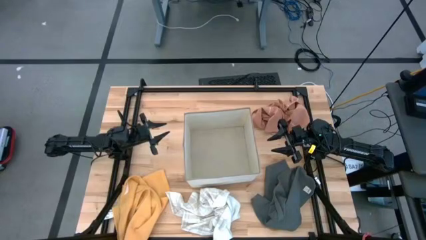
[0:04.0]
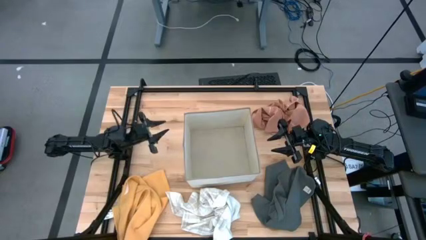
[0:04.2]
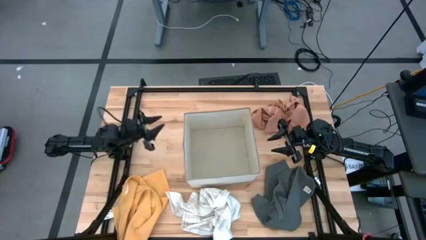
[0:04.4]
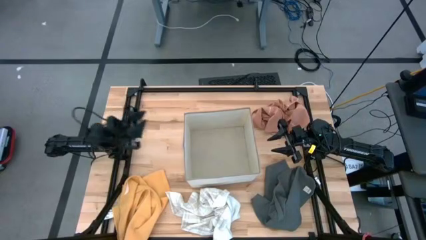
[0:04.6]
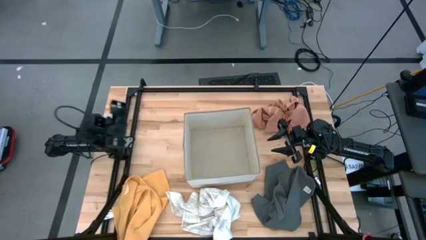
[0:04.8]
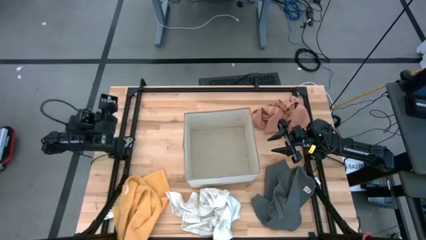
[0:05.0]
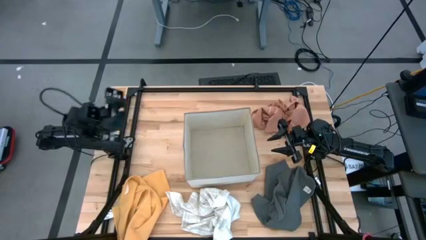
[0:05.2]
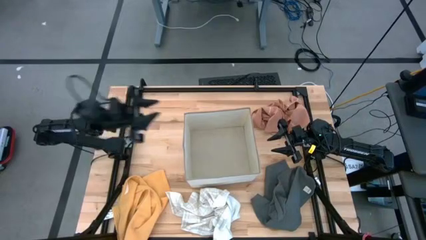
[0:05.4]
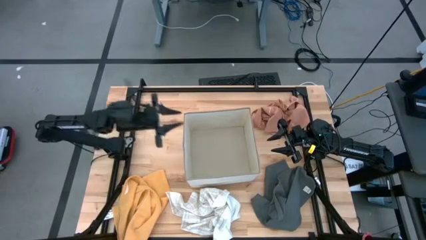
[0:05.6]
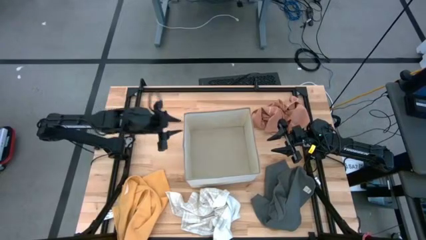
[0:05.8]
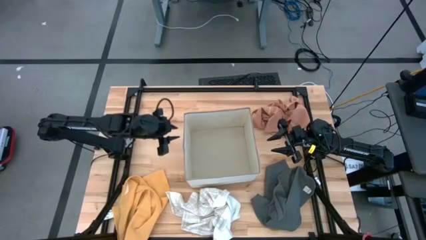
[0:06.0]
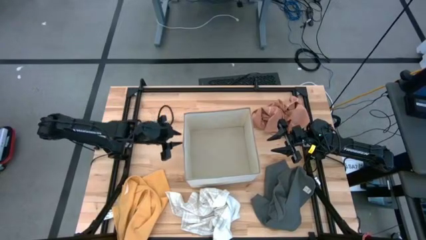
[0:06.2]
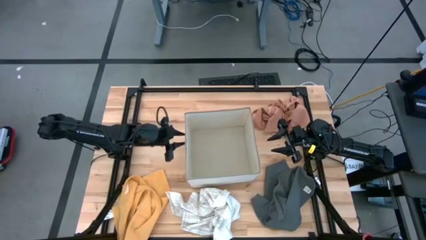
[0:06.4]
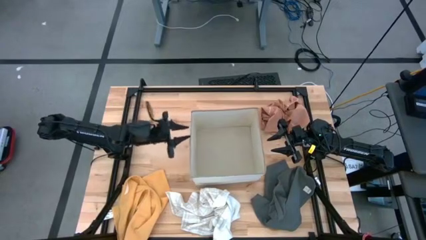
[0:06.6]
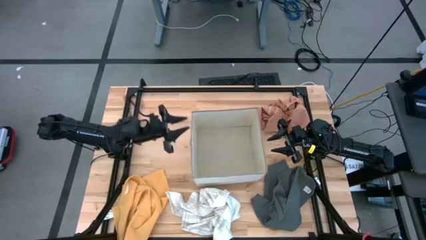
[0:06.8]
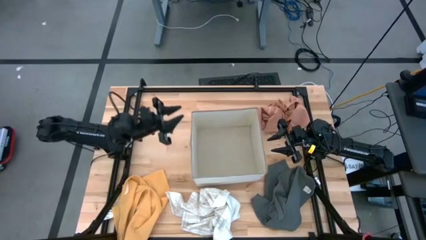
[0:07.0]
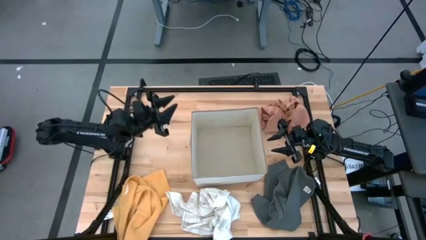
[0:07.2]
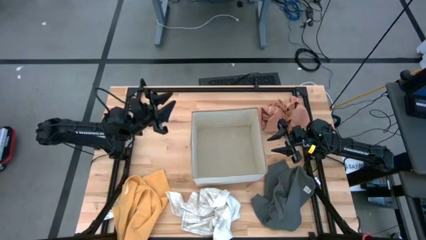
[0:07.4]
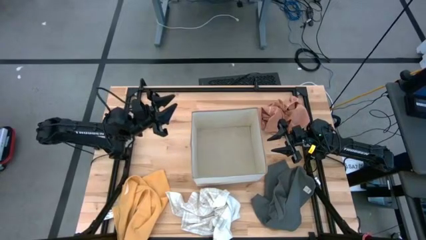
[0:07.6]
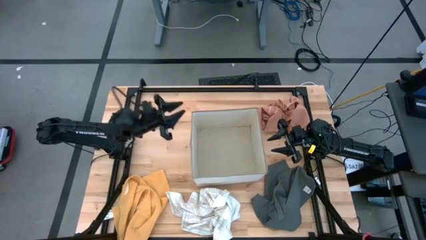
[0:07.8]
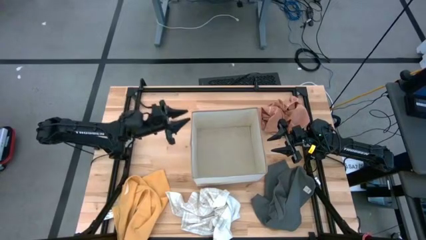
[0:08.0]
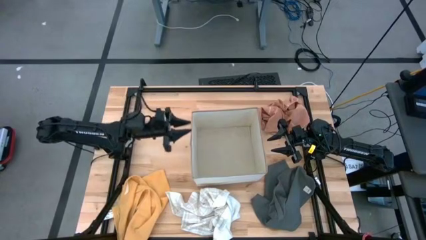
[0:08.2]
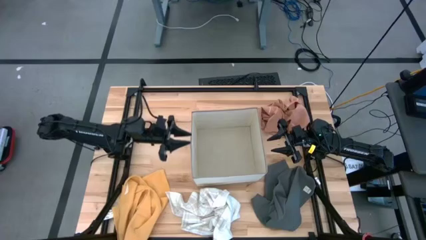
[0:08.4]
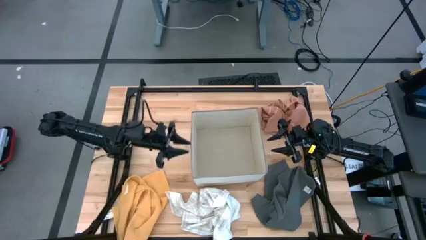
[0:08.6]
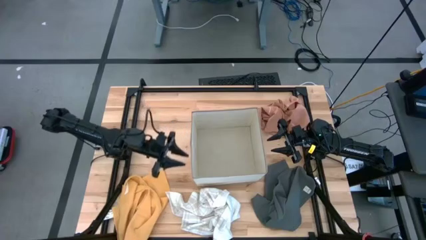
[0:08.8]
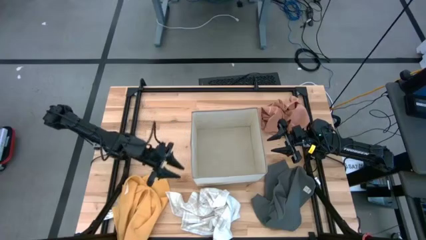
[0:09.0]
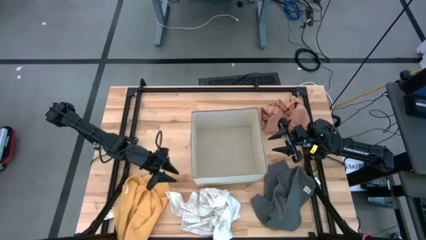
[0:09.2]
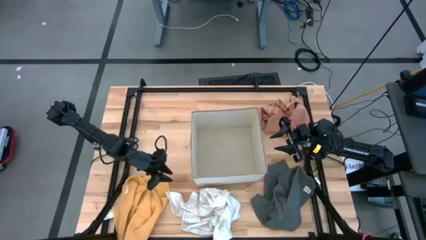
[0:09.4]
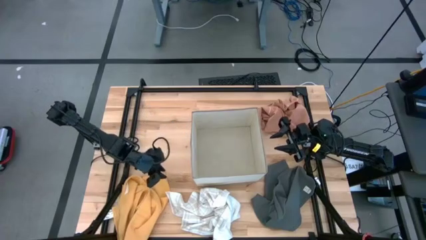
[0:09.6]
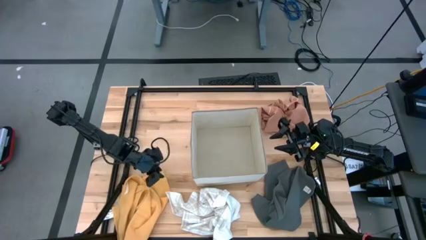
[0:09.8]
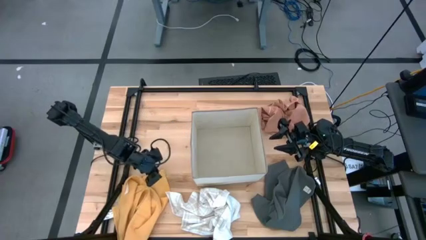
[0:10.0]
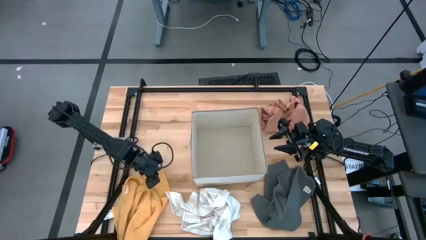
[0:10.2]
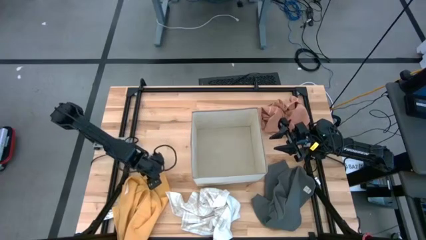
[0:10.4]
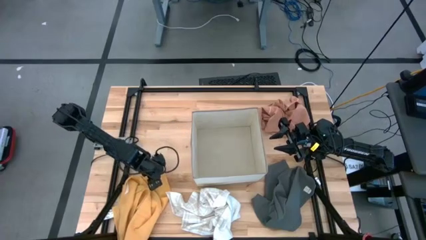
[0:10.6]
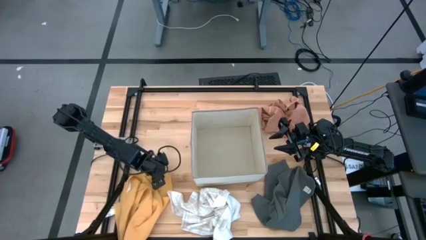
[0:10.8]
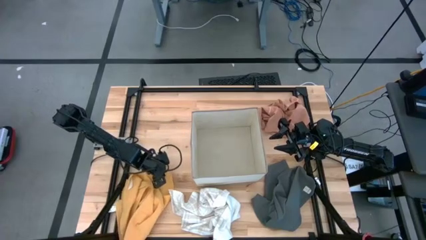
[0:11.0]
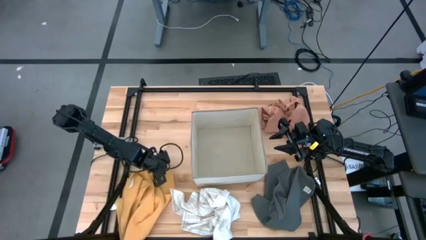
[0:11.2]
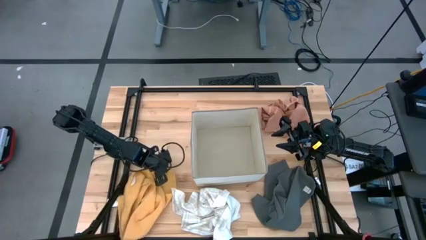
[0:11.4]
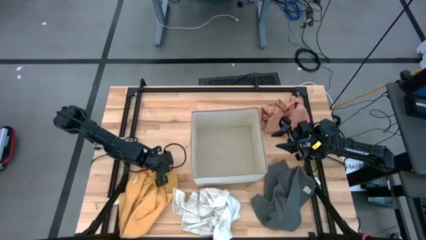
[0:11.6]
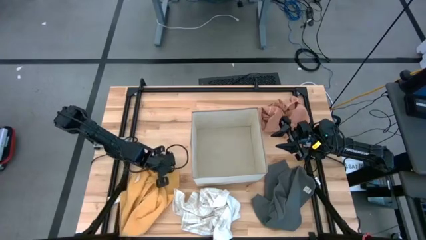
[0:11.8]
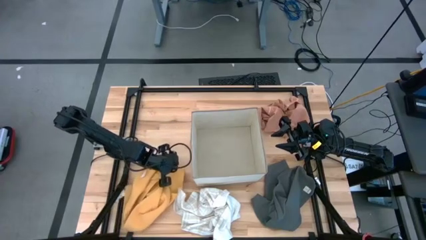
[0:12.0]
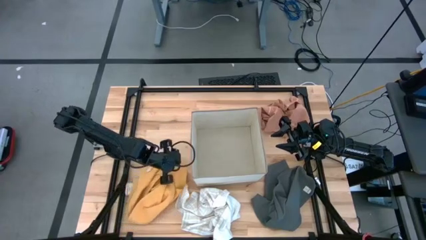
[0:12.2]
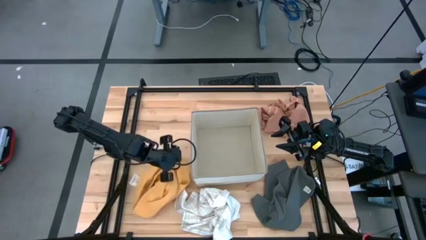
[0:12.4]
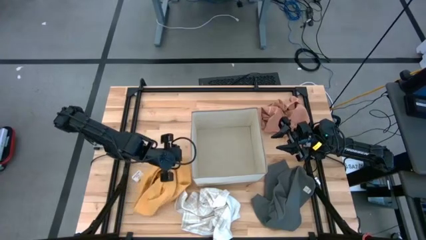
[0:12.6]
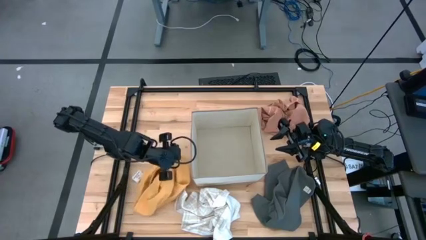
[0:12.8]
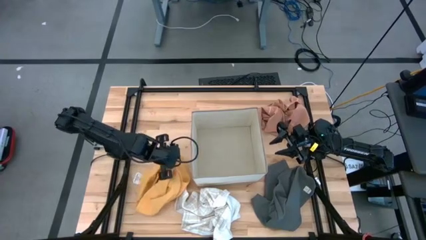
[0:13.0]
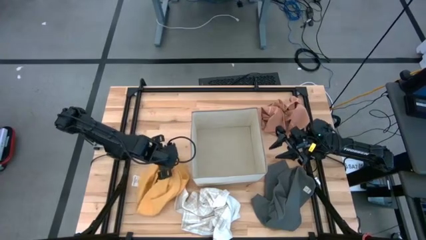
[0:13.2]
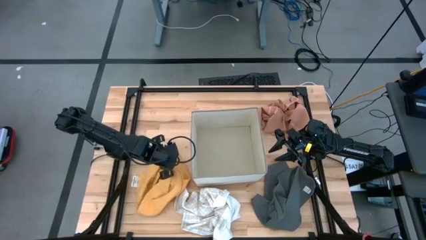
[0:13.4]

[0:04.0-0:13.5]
Task: Fold towel
Fold the yellow towel

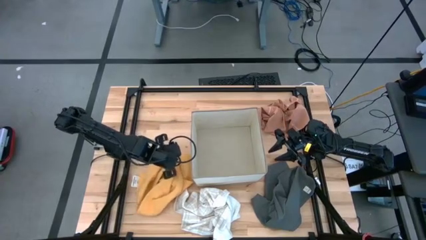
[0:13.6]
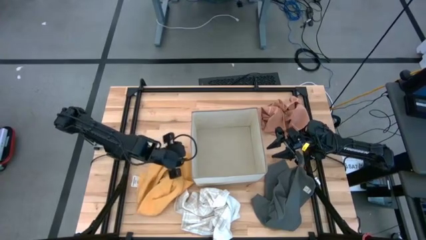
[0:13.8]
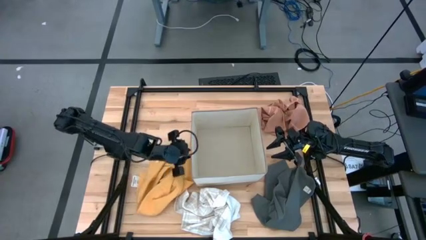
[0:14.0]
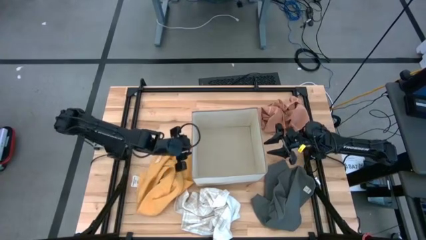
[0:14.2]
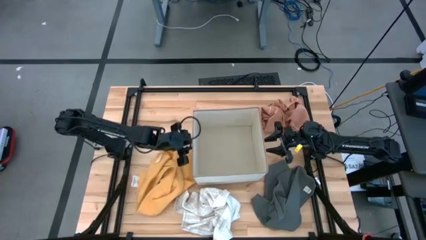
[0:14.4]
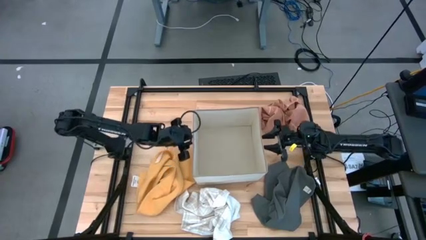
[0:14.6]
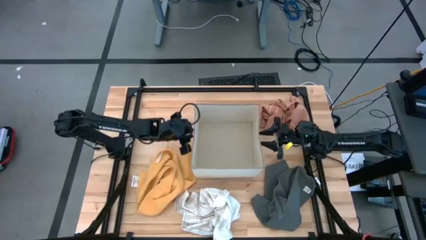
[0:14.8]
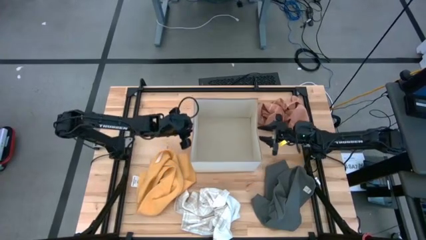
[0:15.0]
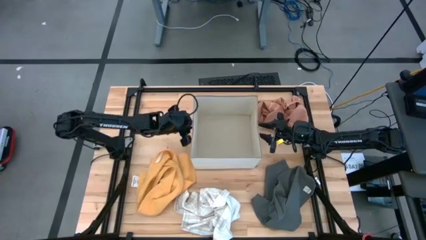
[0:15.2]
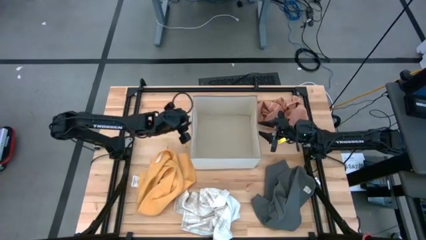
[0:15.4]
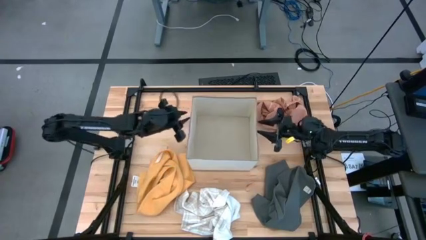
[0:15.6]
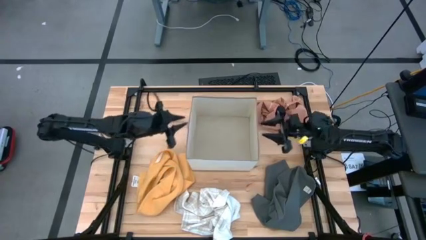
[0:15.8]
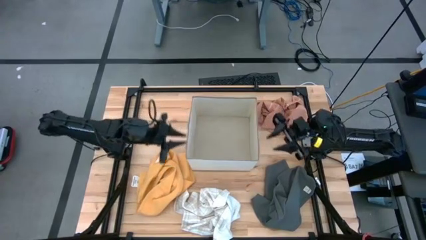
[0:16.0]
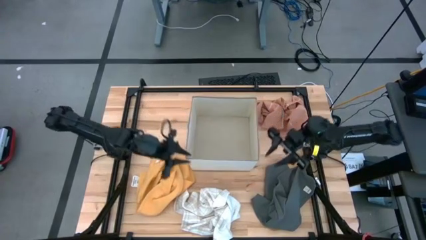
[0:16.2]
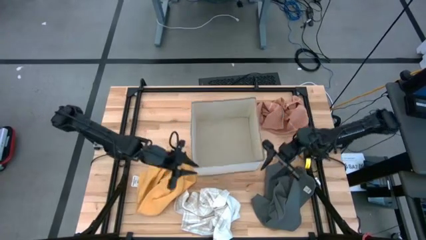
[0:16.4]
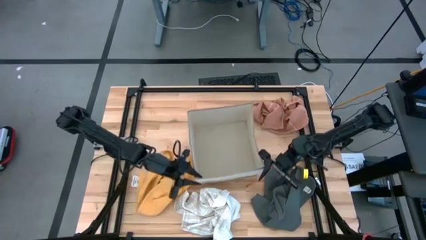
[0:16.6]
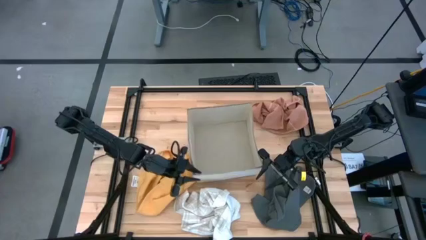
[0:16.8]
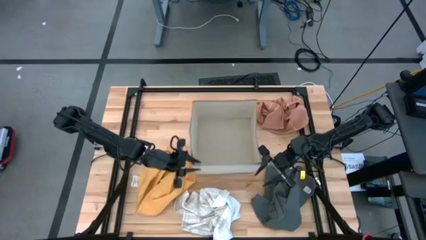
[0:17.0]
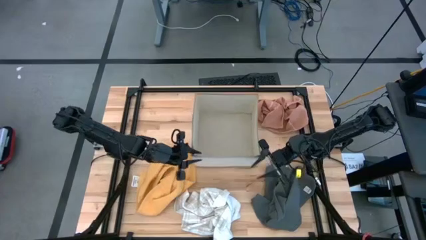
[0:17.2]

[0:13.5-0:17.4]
Adjust the laundry bin

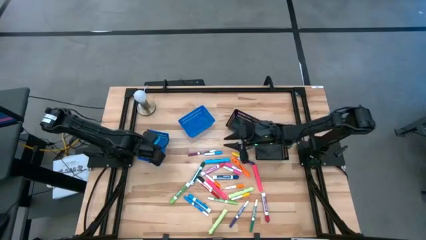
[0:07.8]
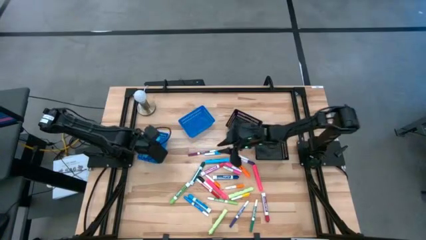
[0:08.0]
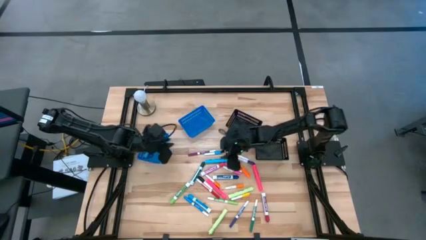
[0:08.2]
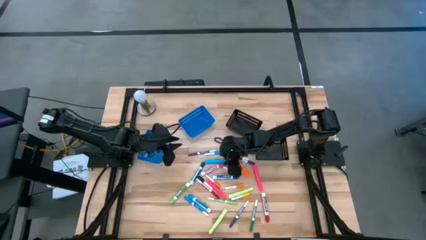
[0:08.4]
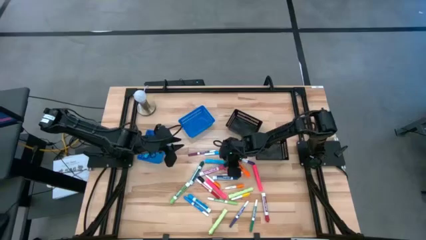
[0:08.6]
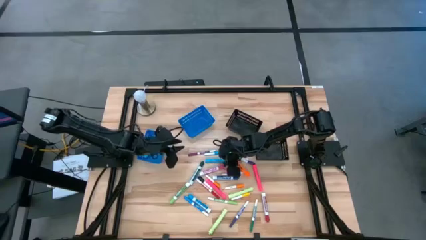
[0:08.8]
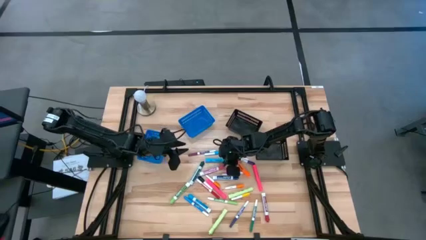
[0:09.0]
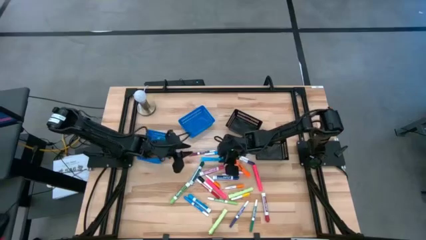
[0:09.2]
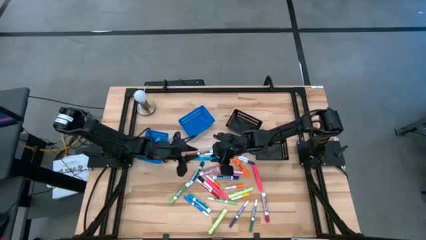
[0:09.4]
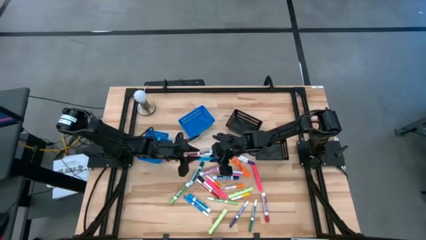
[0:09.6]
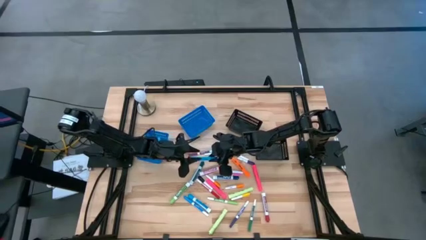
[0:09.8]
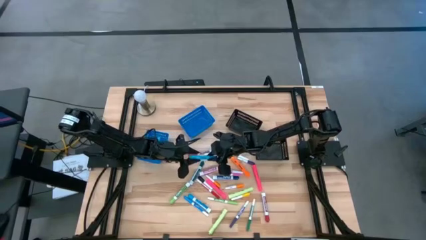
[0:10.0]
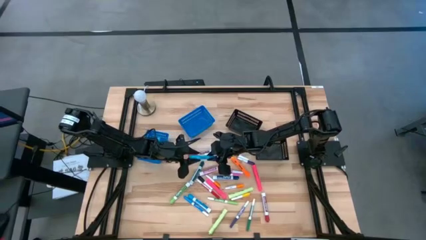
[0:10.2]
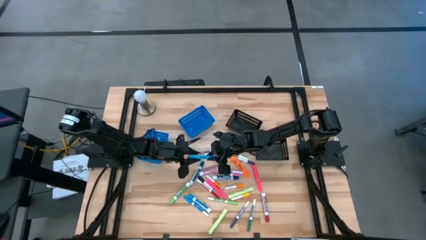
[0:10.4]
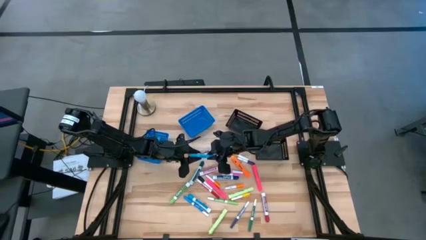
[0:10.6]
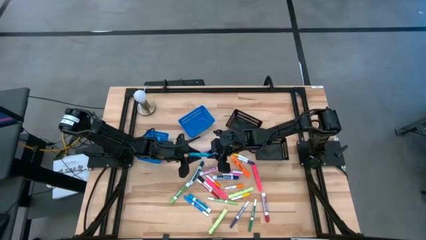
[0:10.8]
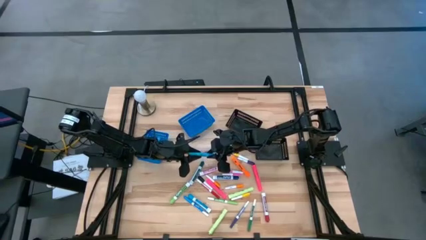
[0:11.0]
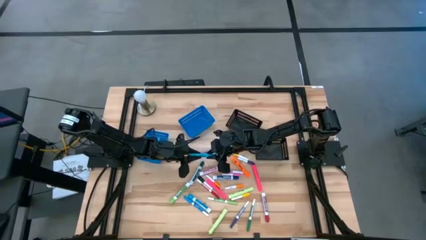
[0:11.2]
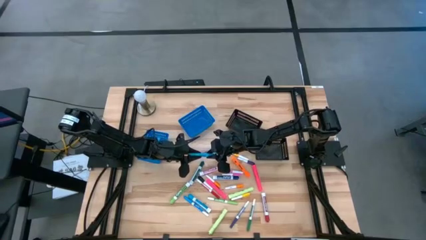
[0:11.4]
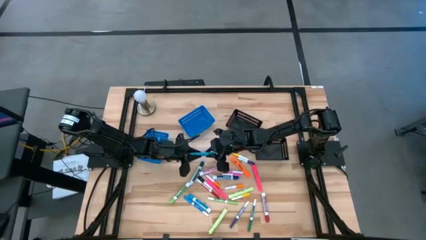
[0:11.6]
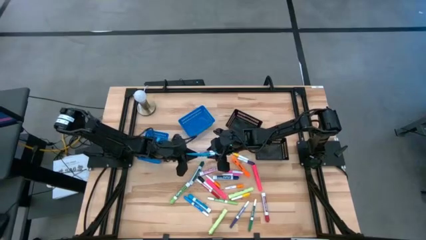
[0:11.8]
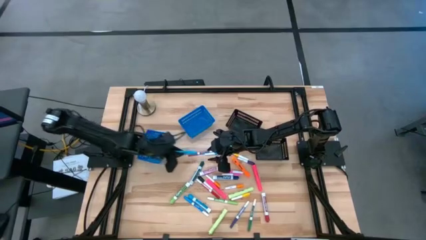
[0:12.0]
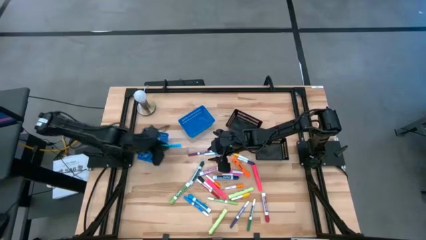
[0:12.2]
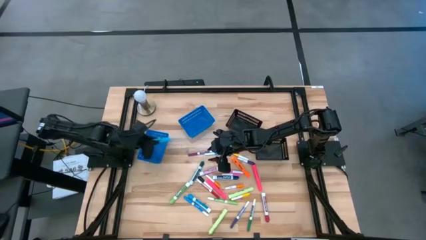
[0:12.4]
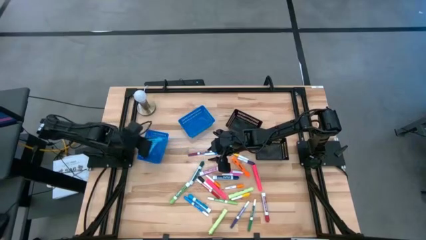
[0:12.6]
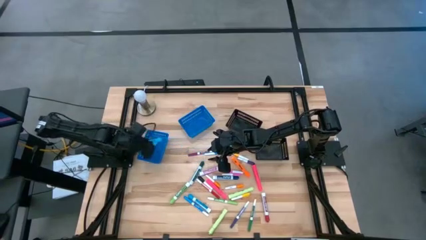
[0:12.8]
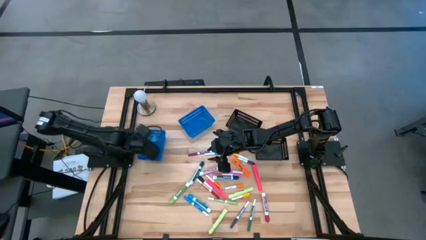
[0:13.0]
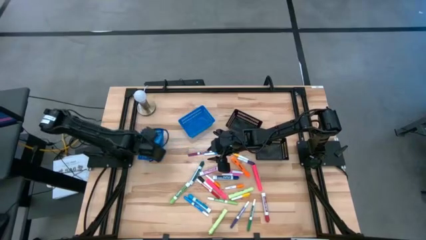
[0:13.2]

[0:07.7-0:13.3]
Task: Pick & Place Markers
Put the left blue highlighter pen into the left blue bin
